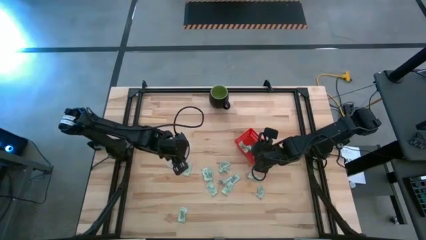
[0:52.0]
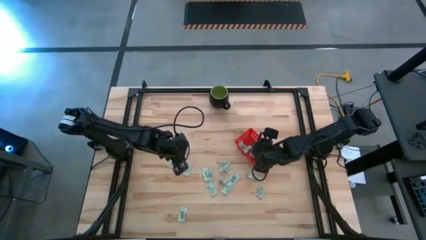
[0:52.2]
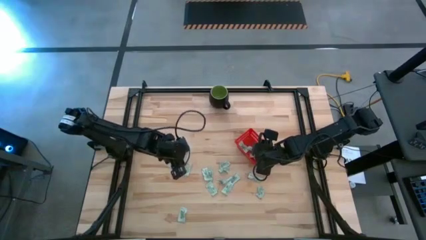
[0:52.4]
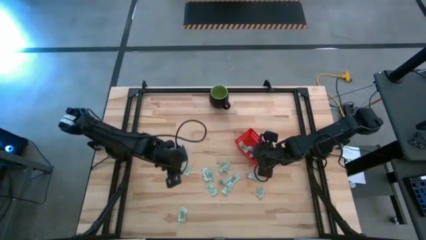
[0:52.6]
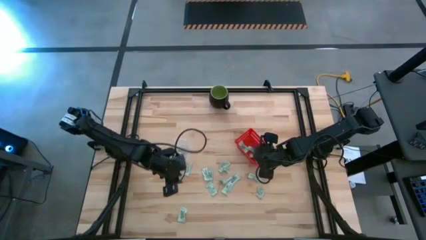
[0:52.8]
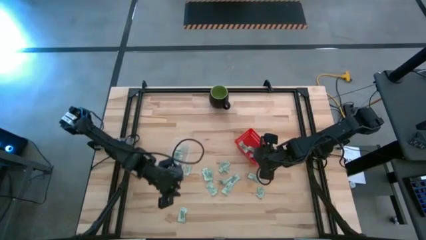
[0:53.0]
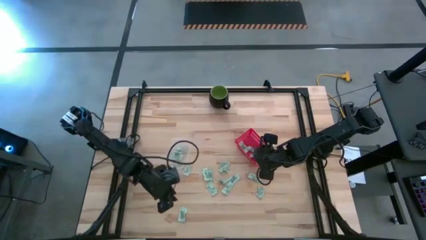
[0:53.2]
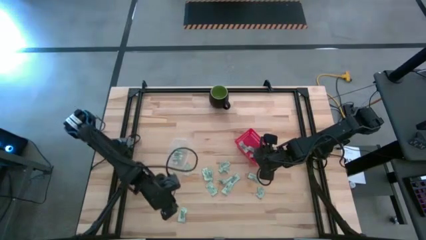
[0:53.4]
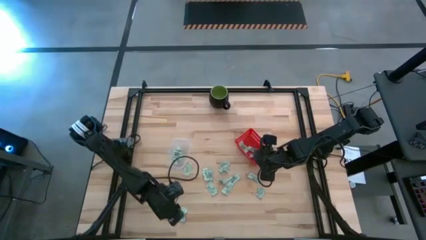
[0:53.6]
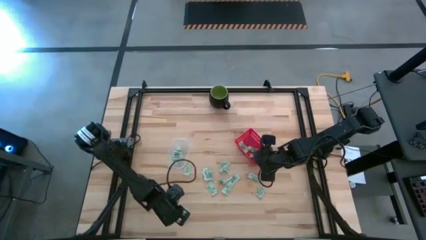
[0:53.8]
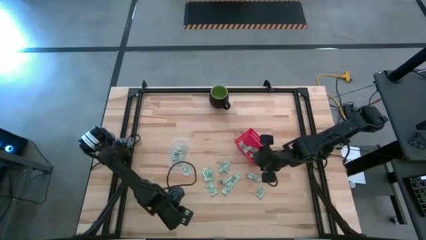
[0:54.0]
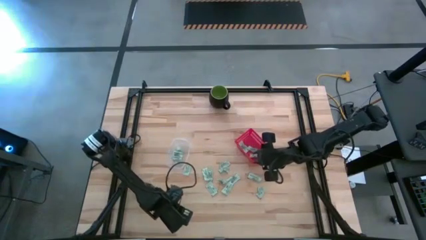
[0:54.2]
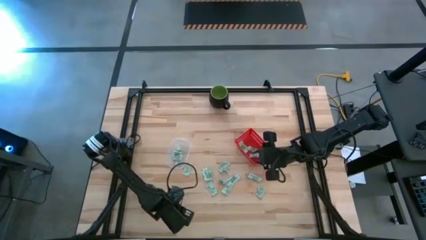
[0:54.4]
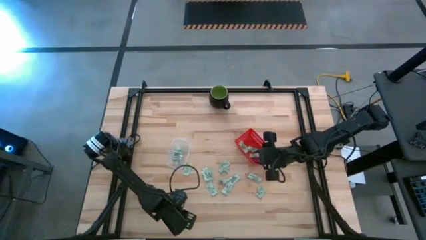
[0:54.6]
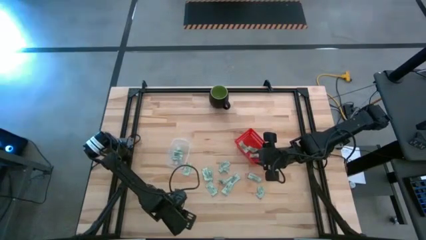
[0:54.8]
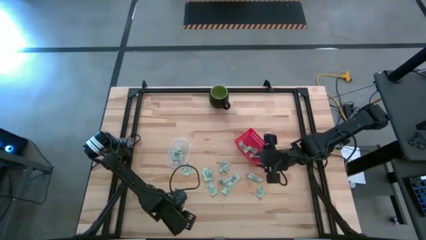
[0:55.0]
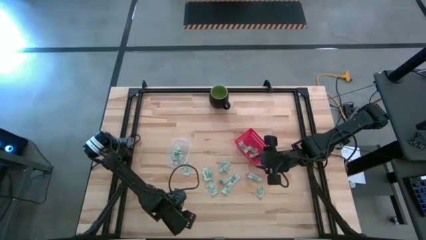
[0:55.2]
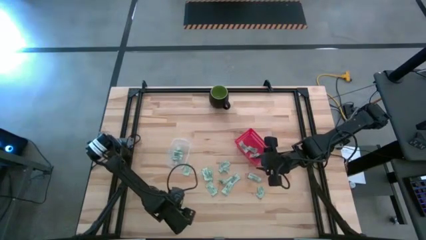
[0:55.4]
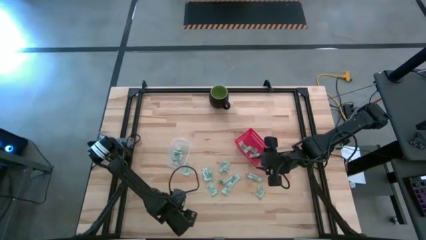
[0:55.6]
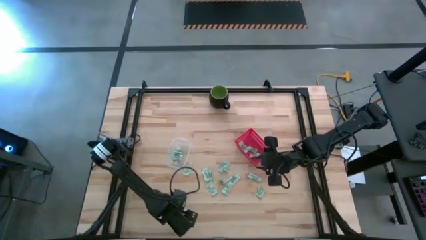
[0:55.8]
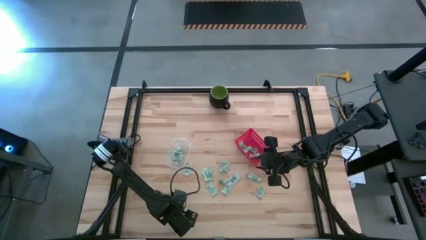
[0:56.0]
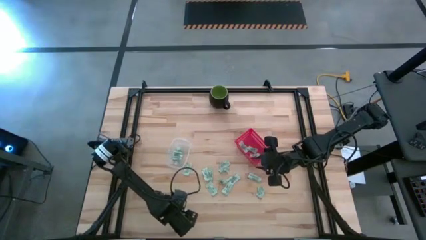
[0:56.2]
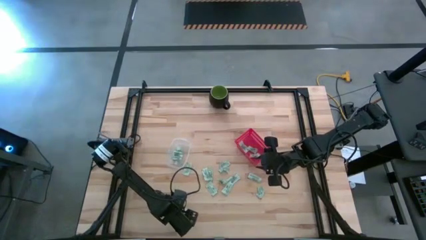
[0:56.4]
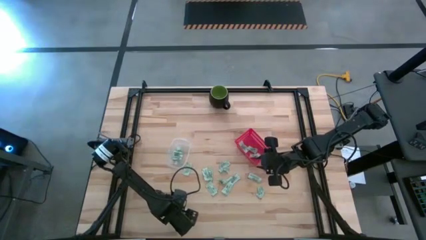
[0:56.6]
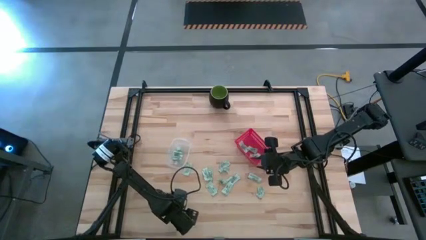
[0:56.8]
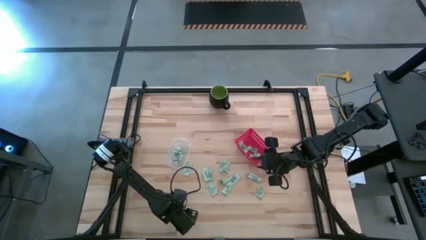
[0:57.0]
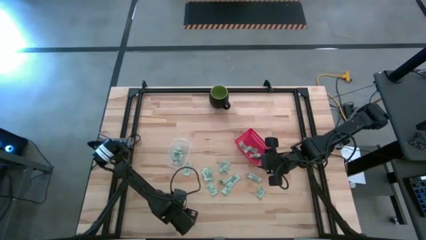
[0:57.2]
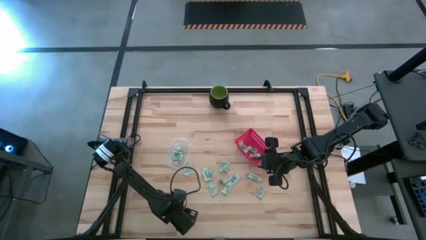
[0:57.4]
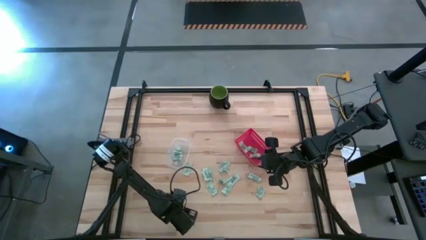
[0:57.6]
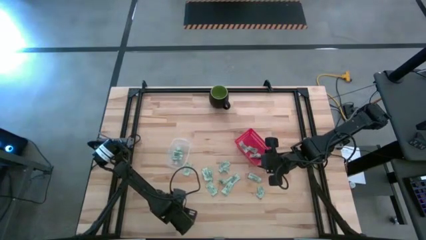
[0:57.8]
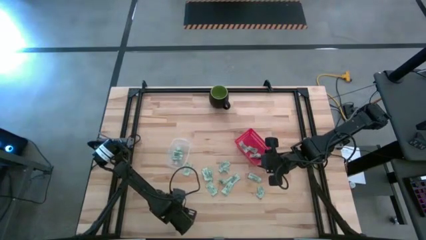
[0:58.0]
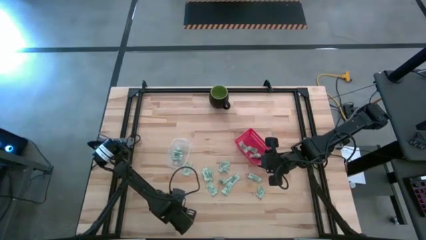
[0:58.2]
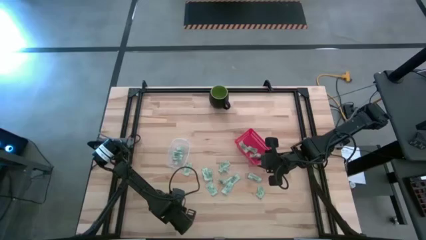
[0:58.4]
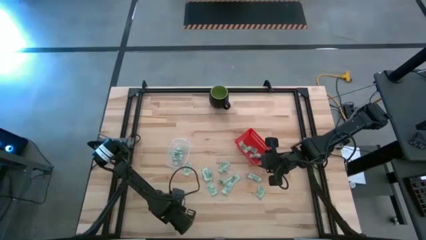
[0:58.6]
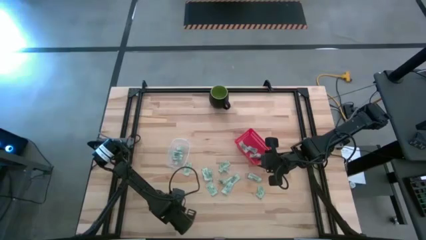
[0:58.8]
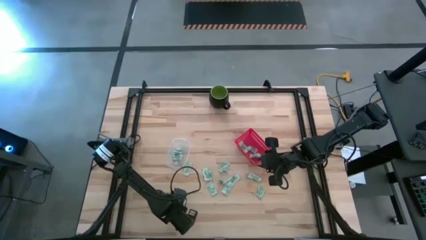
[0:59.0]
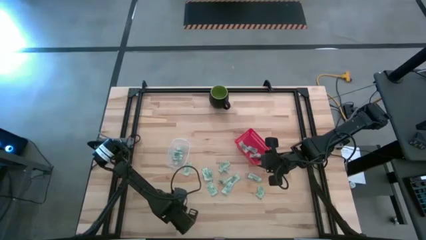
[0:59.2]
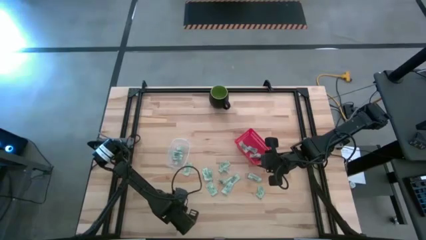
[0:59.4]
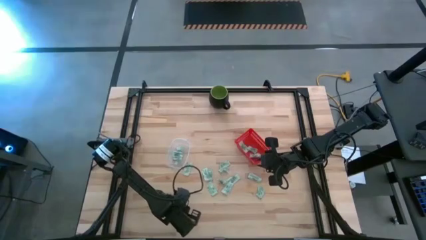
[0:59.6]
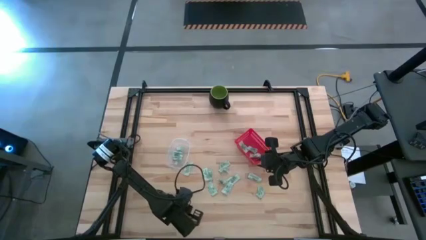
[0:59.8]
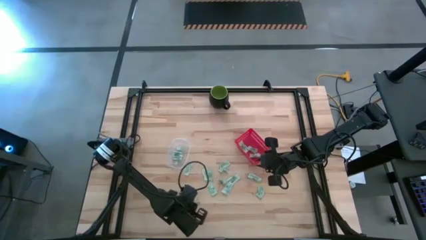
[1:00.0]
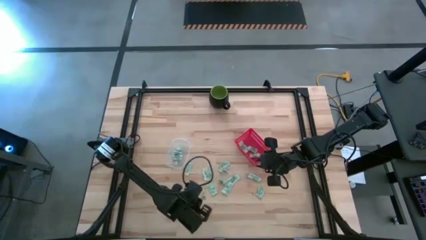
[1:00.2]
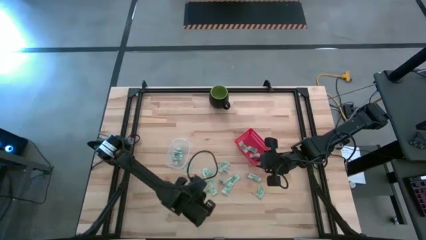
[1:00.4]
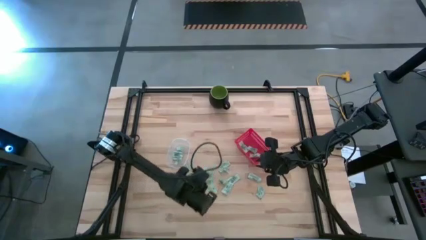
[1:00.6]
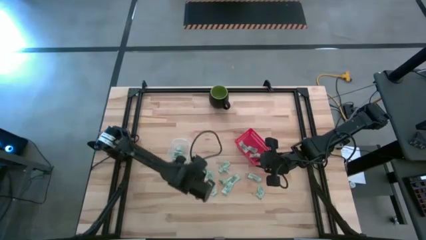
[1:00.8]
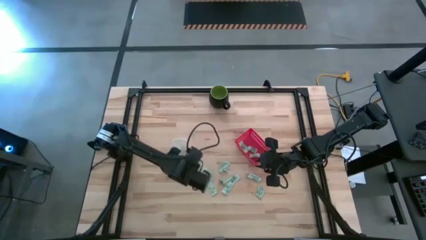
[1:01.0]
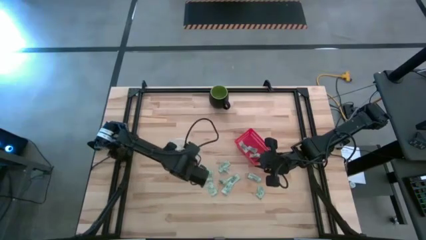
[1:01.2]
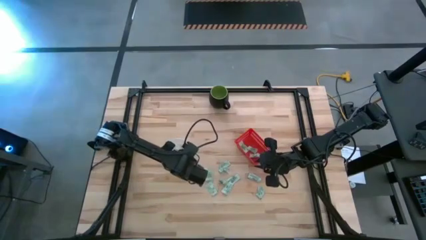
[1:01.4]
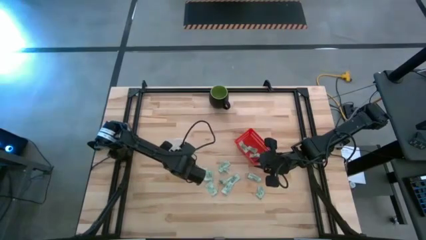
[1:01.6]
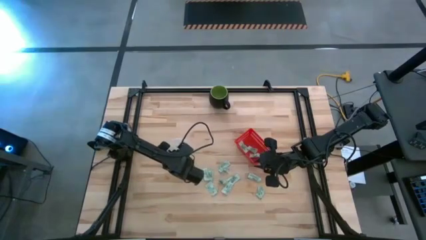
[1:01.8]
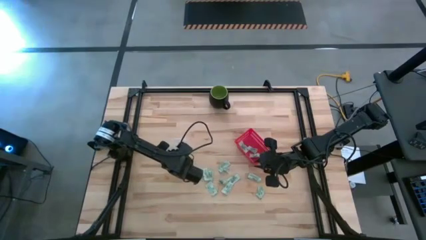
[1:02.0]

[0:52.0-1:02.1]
Task: Pick and place items into bin
Put the stevia packet into the transparent bin

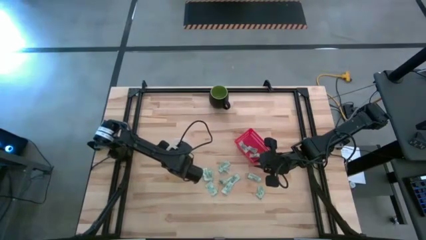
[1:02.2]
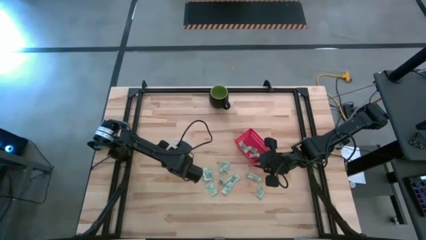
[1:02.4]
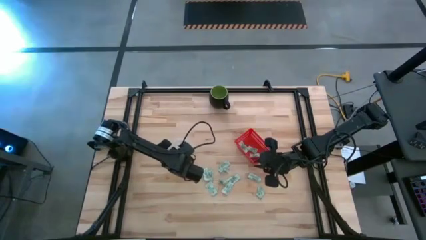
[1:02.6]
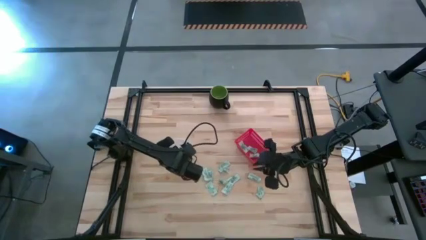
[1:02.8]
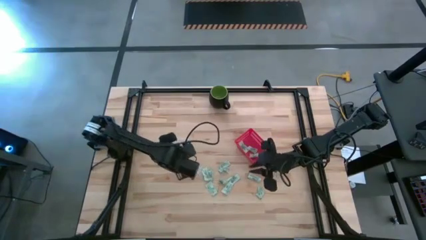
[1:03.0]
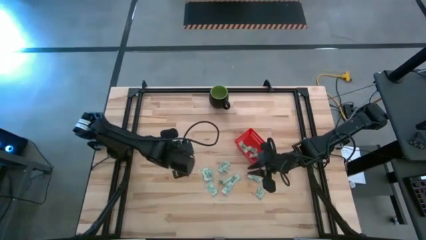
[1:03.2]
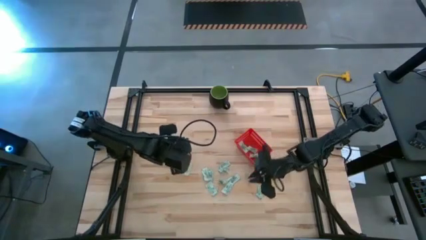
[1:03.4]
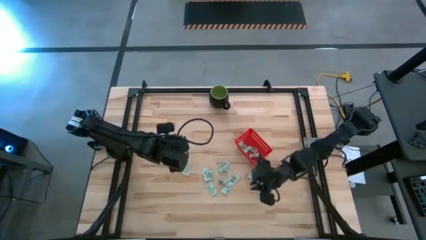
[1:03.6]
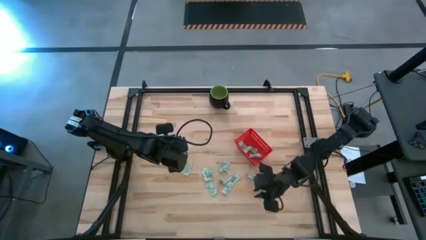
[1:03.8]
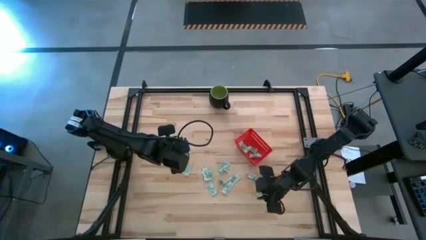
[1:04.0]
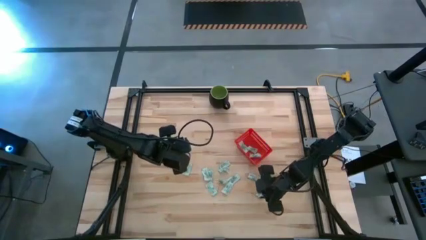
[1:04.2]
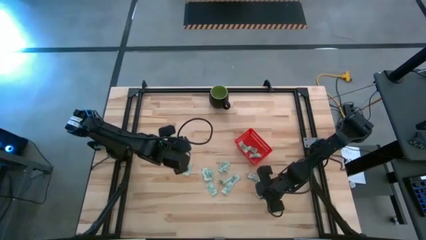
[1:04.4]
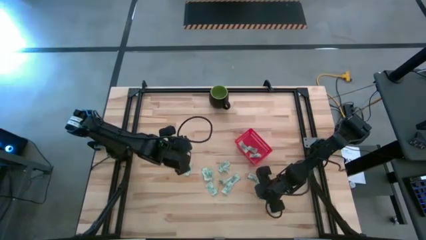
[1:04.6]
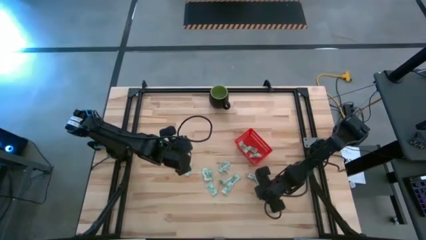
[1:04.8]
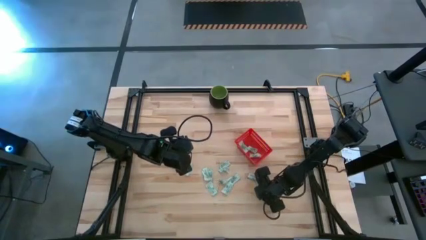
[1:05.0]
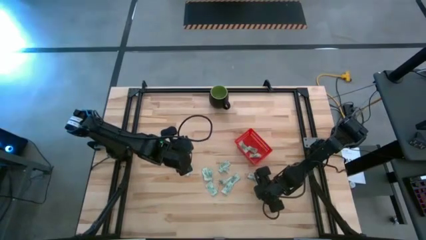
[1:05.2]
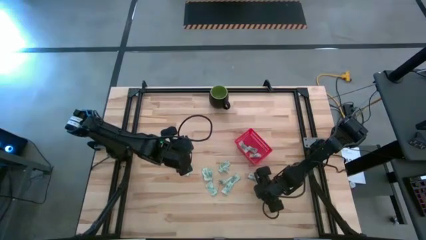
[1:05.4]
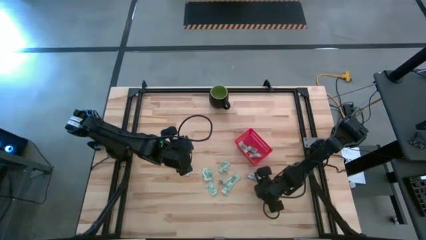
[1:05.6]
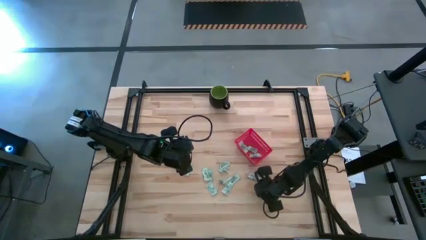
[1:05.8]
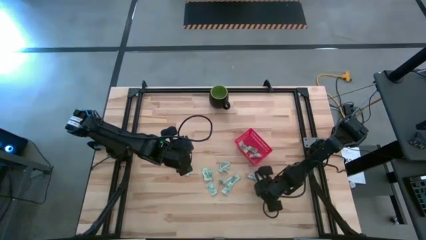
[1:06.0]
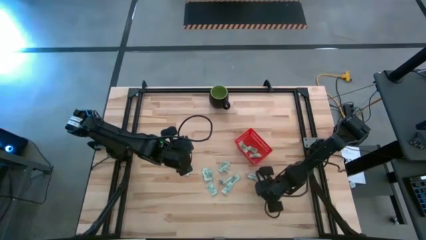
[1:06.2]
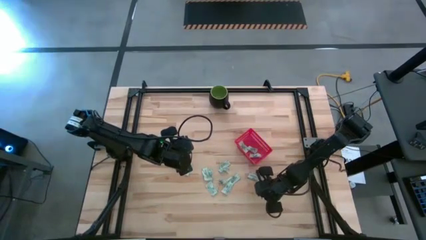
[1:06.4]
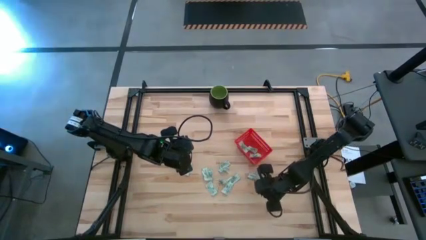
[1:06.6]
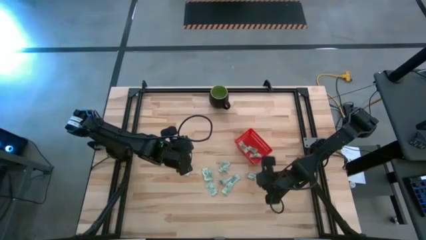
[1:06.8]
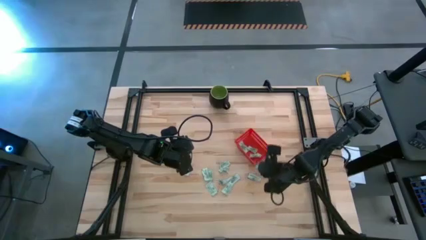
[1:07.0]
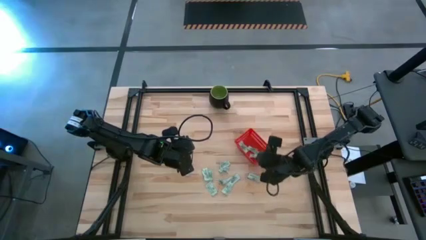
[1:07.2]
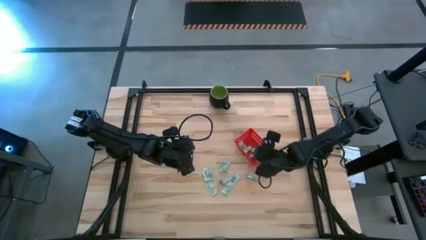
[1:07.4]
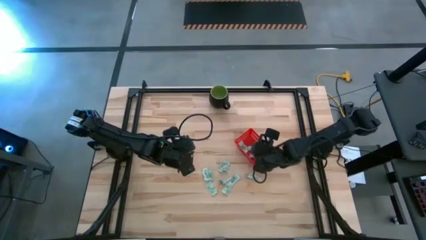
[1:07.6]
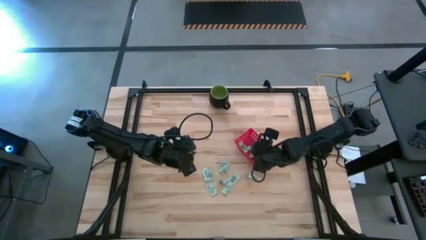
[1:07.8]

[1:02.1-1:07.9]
Put the stevia packet into the red basket
